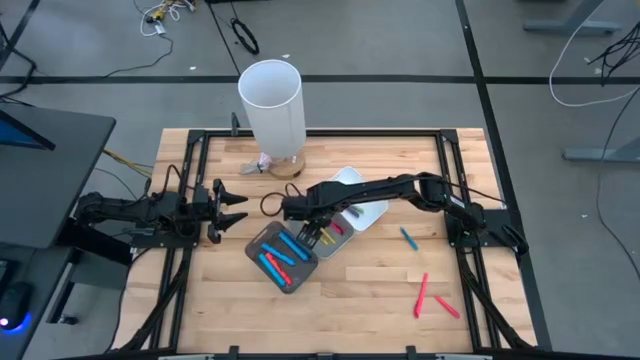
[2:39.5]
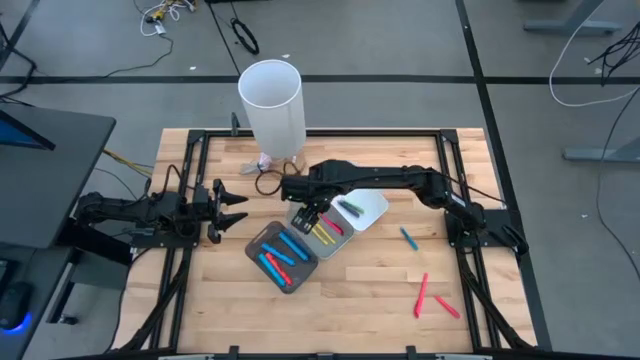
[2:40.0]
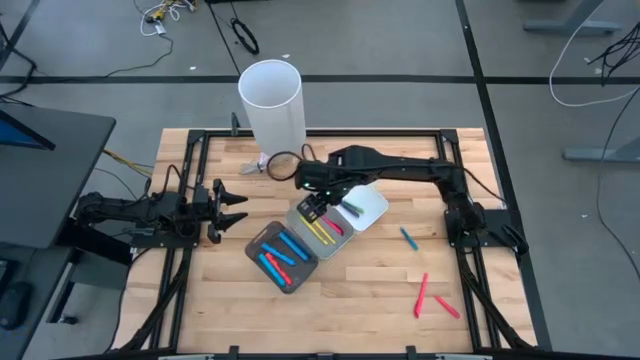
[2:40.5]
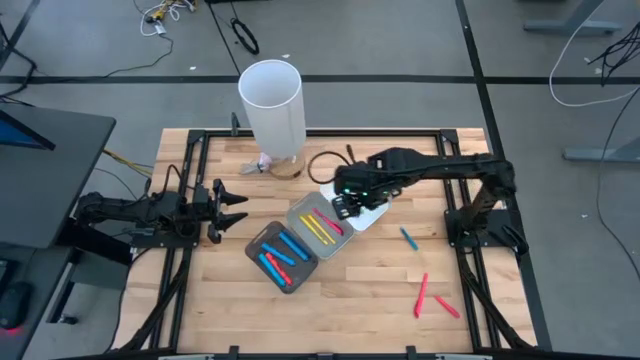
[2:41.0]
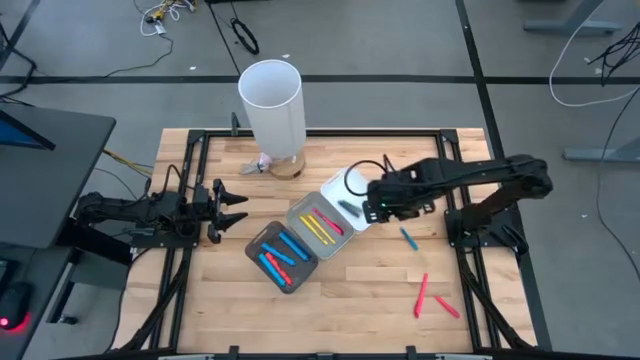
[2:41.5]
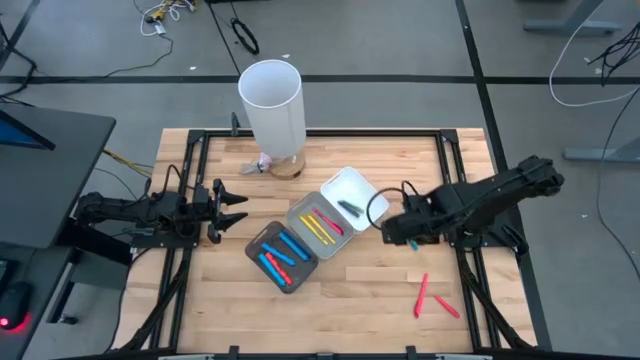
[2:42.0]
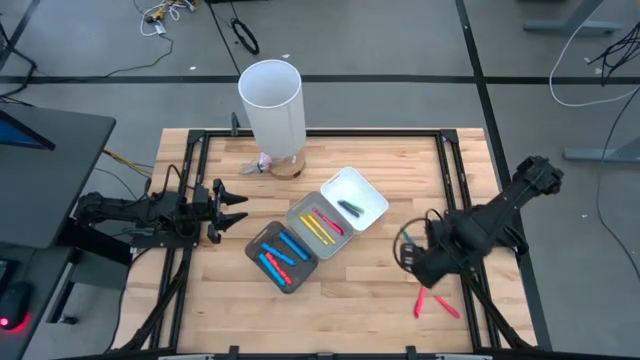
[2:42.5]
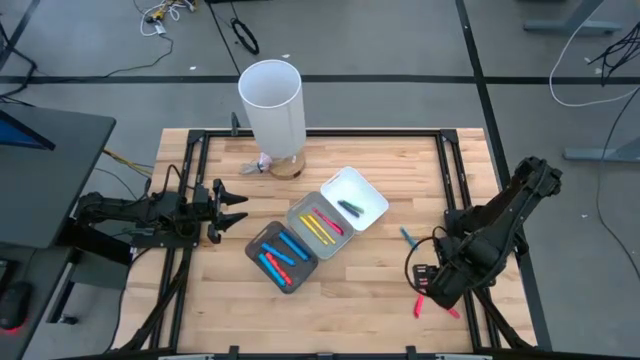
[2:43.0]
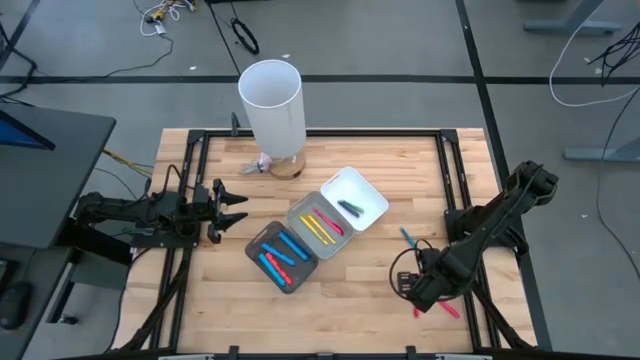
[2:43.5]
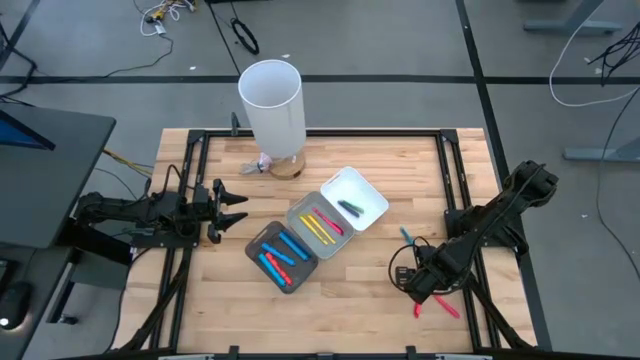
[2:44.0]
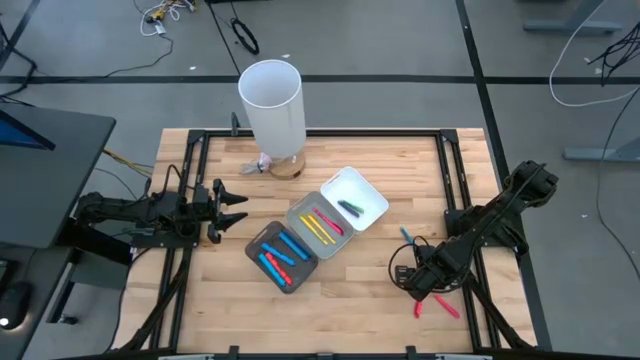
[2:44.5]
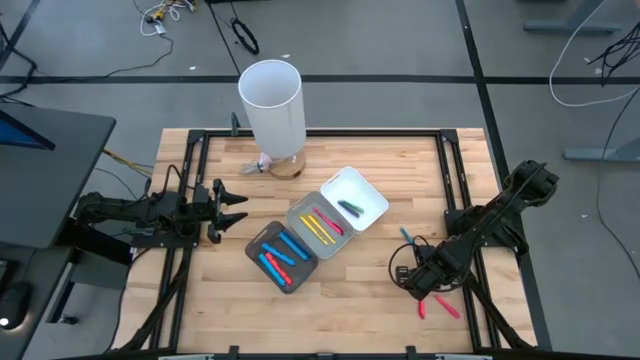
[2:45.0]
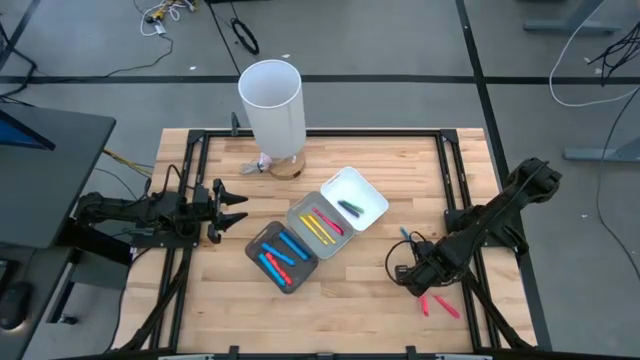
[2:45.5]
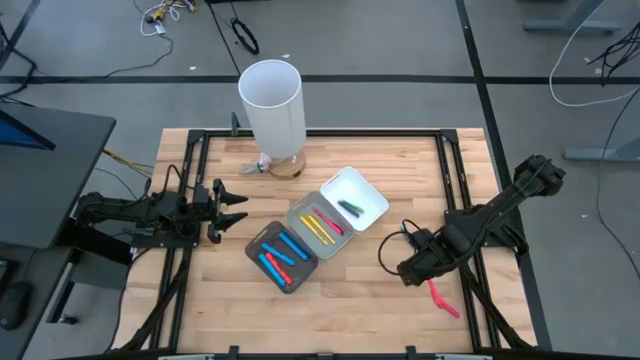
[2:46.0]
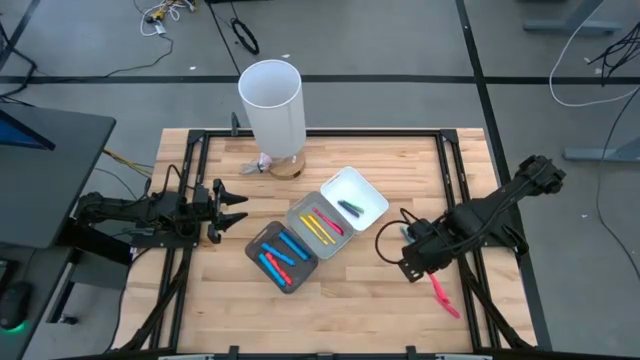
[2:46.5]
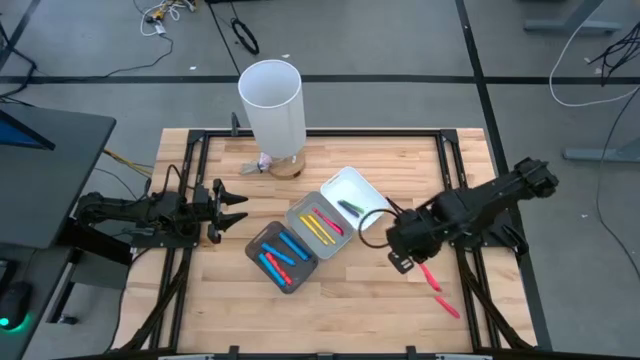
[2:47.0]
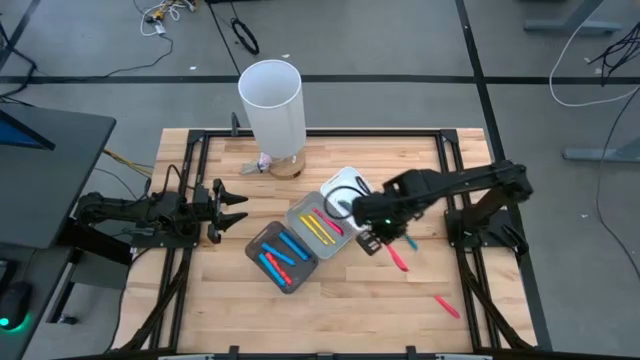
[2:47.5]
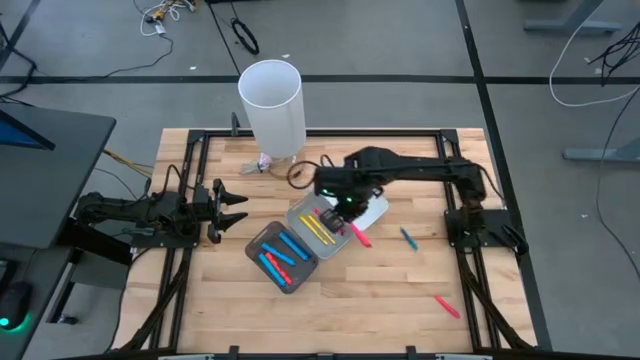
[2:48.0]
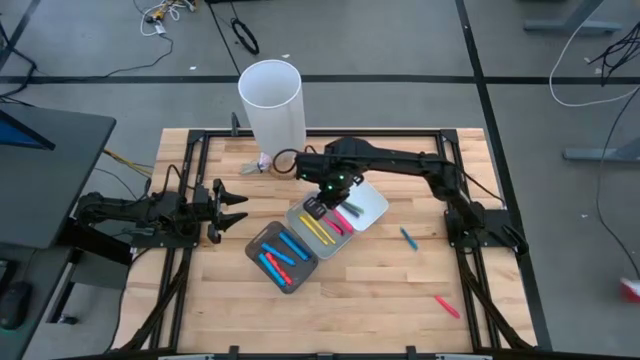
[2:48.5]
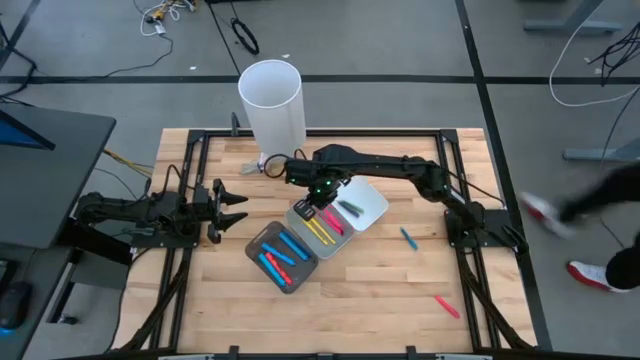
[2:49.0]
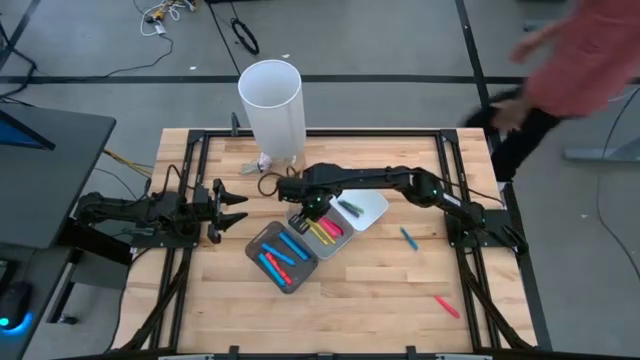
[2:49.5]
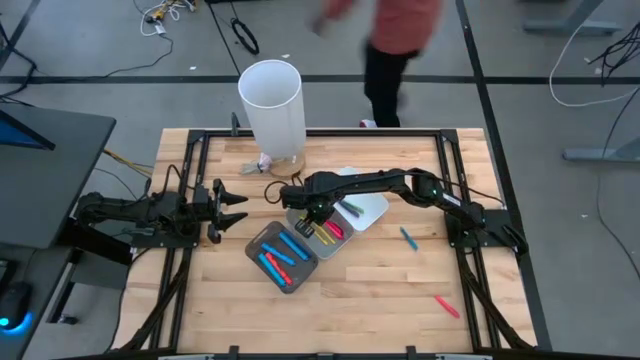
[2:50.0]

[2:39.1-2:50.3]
Task: Pick & Place Markers
Put the pink marker into the gray bin

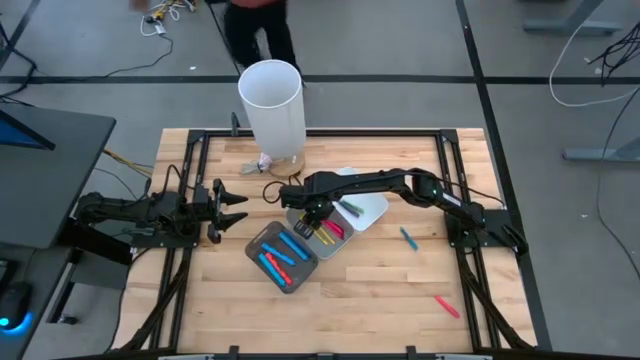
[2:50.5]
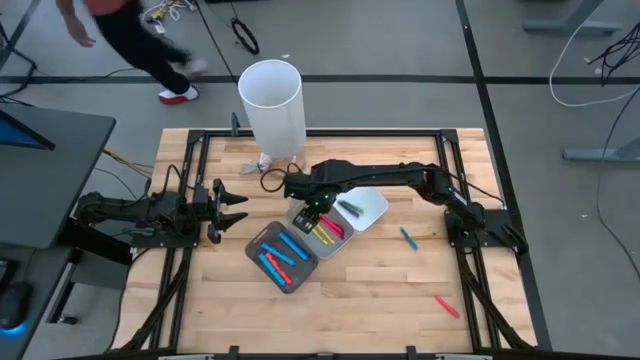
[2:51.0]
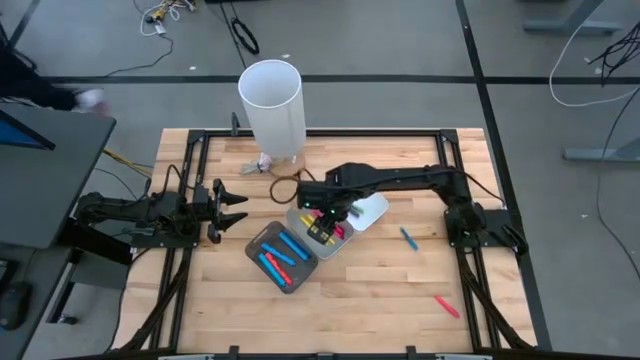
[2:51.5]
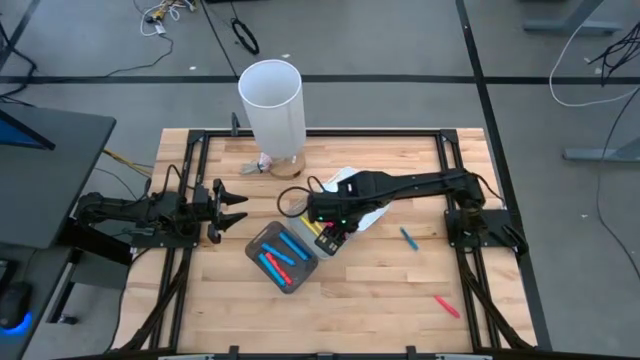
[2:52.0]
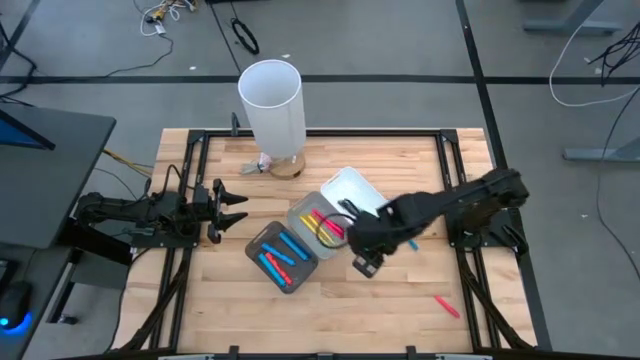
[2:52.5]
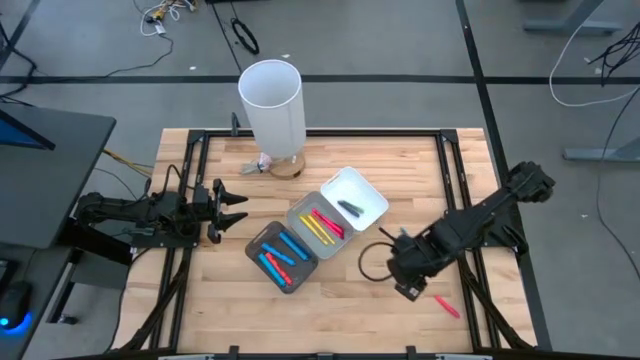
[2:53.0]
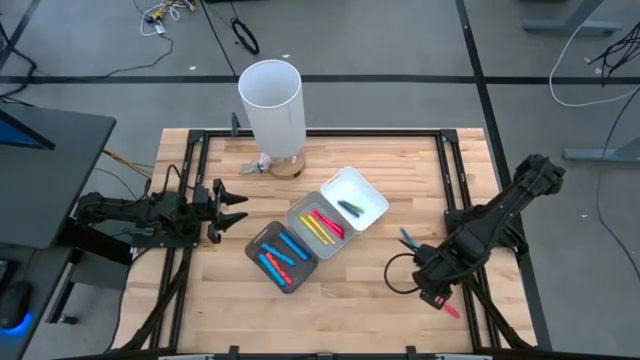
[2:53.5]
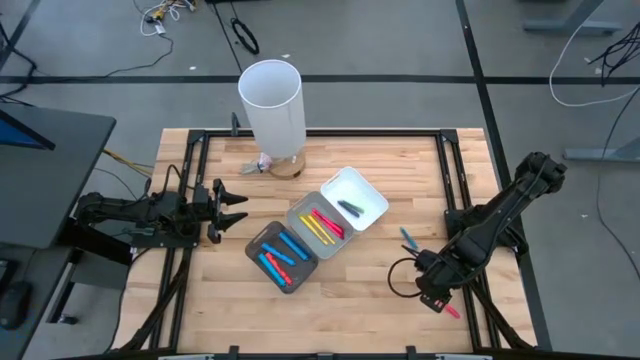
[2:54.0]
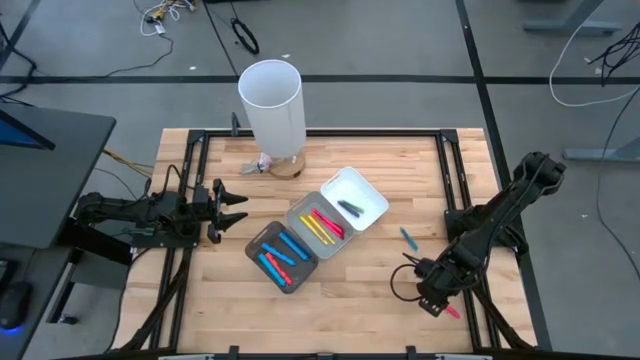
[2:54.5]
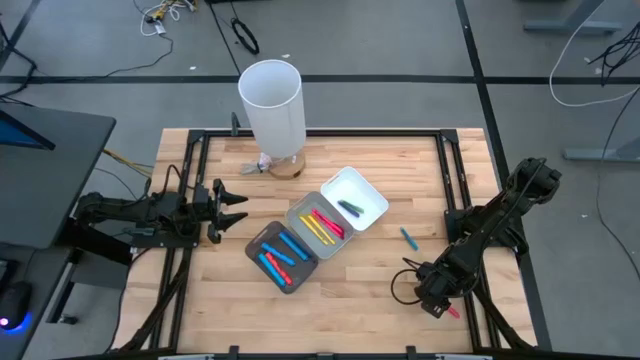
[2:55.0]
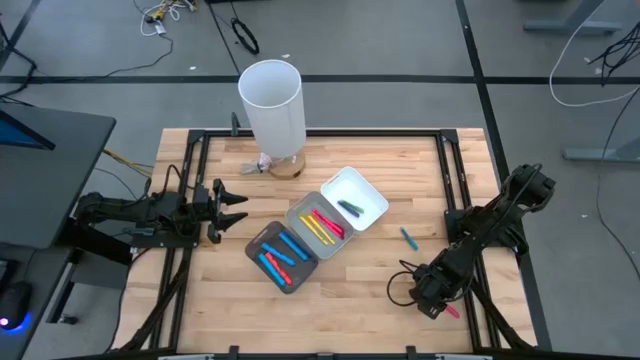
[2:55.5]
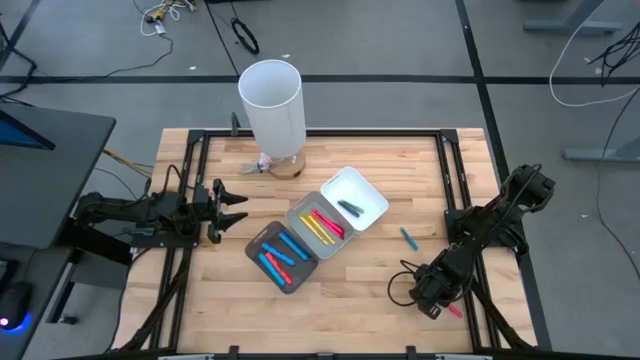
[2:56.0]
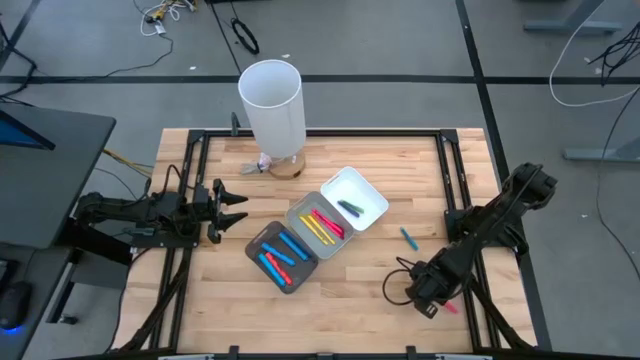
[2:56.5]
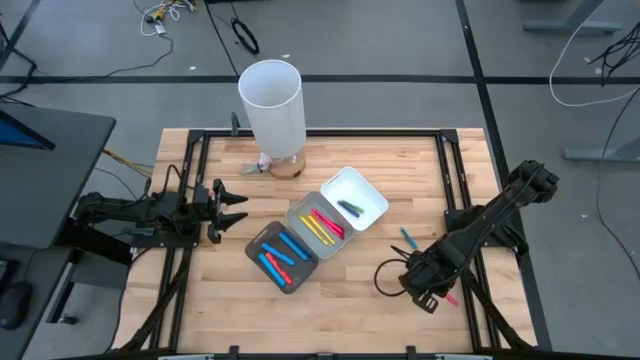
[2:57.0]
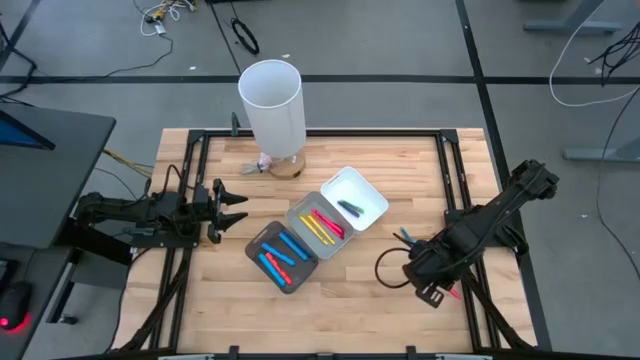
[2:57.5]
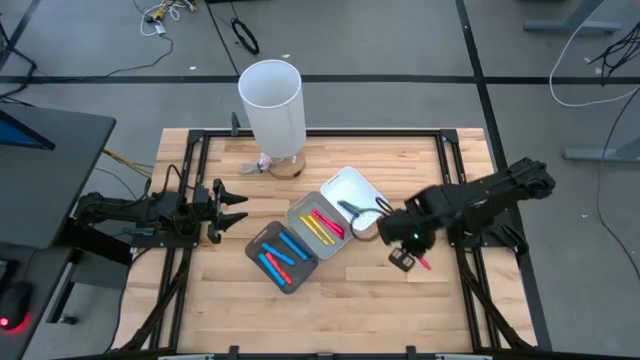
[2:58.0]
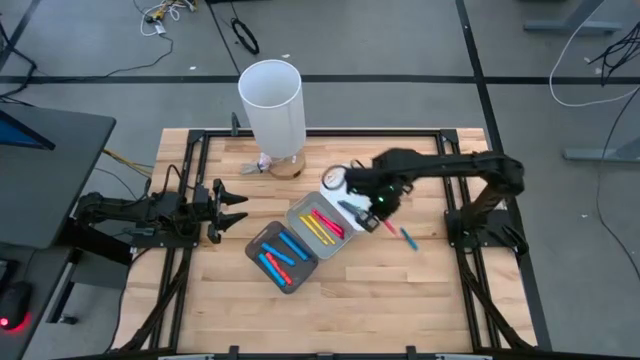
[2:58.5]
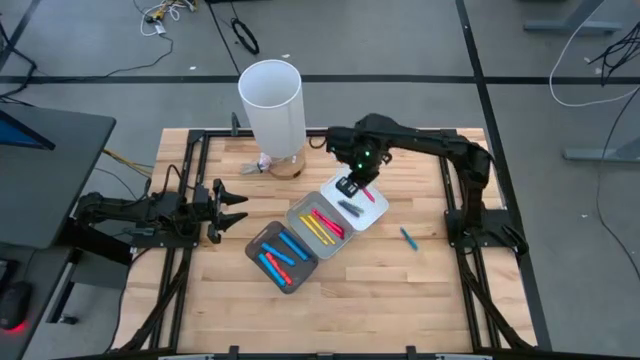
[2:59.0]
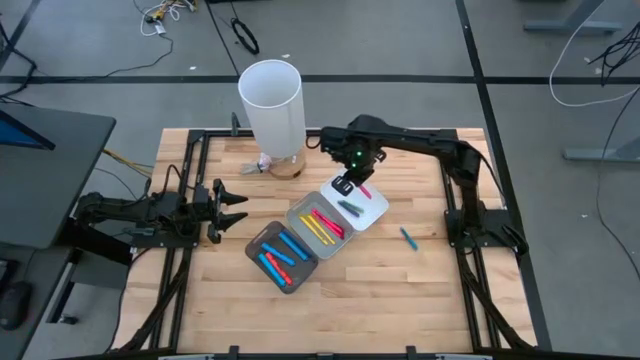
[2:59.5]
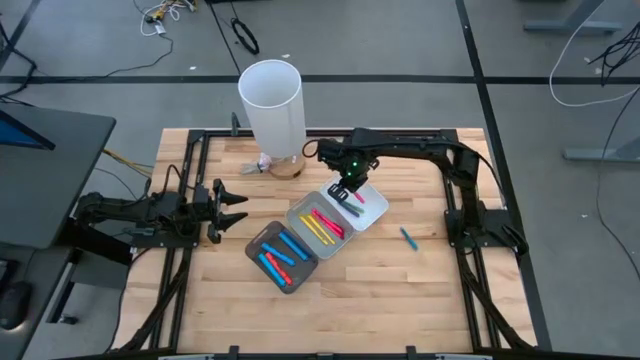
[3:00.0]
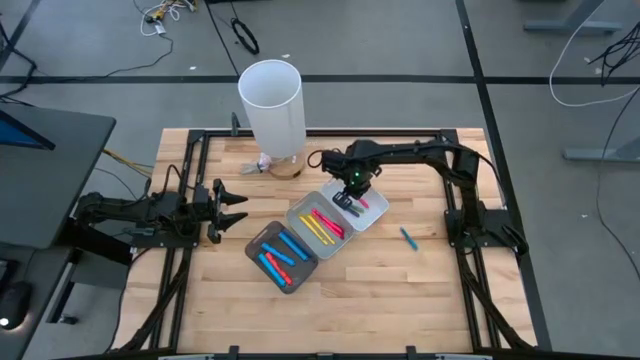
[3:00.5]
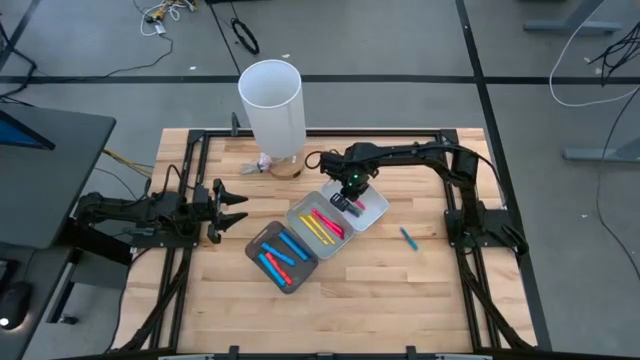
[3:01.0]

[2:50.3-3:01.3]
Put the pink pen into the white bin
